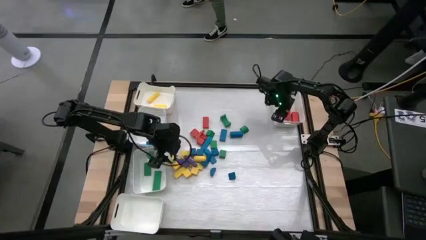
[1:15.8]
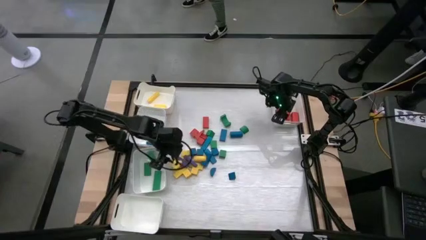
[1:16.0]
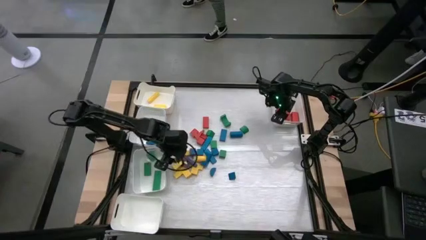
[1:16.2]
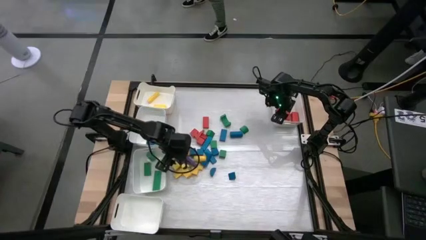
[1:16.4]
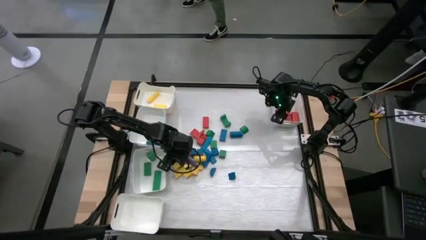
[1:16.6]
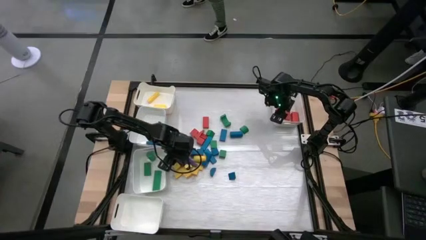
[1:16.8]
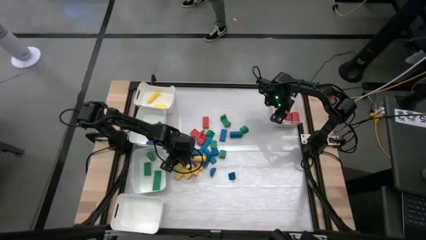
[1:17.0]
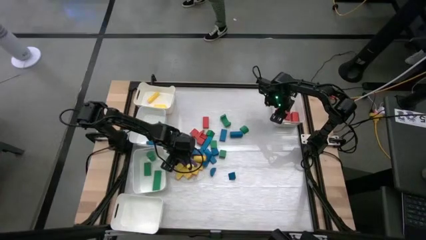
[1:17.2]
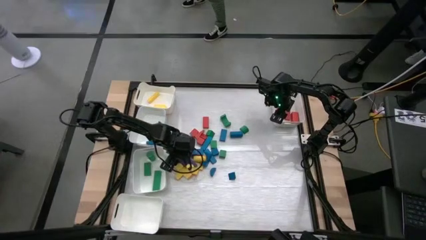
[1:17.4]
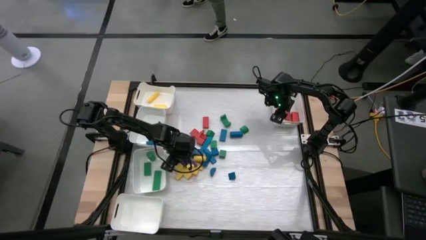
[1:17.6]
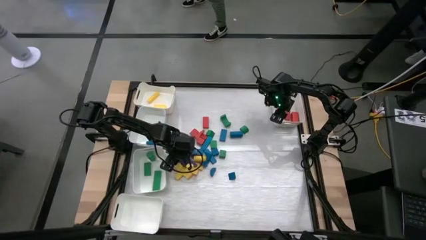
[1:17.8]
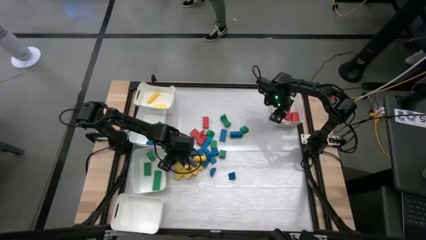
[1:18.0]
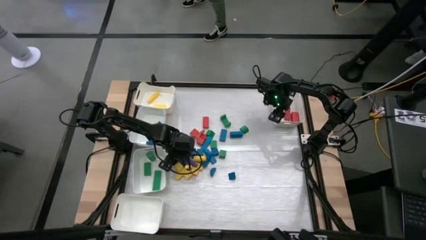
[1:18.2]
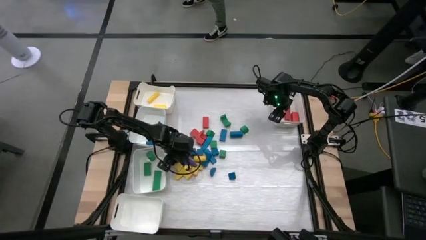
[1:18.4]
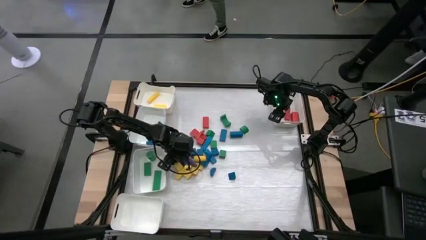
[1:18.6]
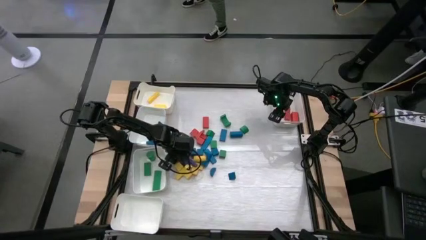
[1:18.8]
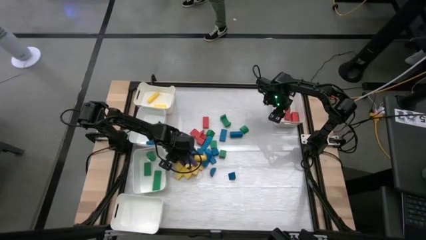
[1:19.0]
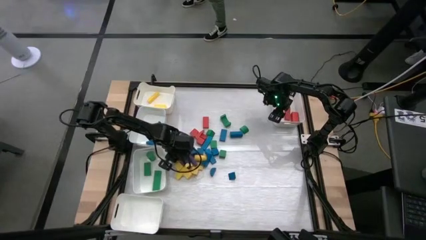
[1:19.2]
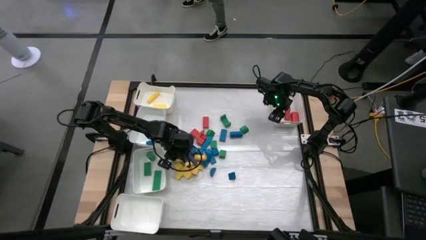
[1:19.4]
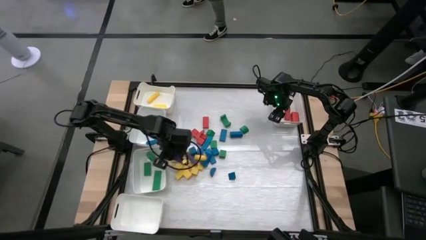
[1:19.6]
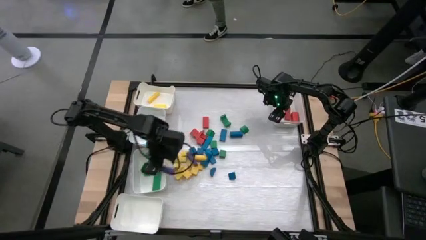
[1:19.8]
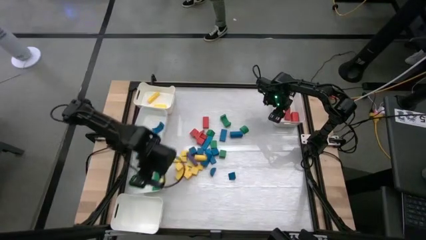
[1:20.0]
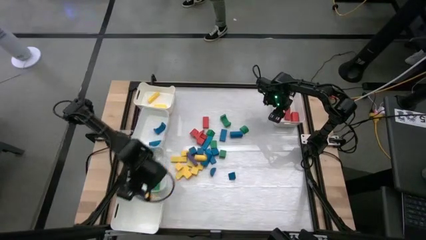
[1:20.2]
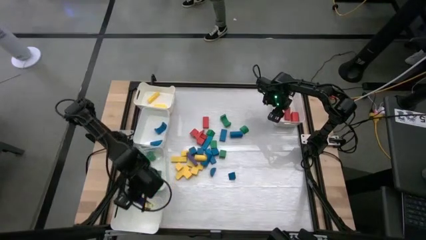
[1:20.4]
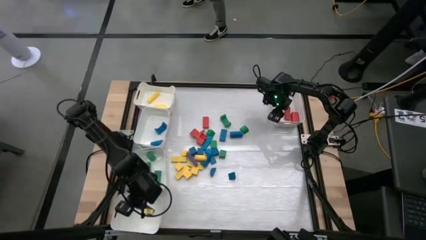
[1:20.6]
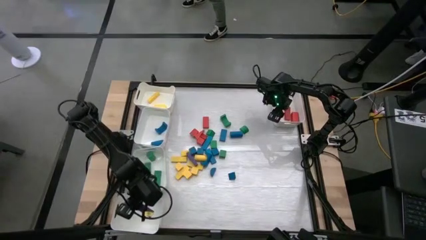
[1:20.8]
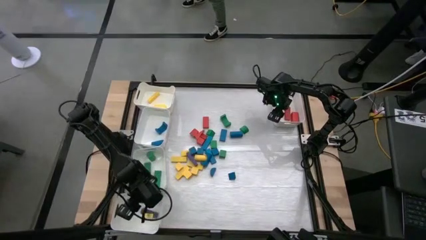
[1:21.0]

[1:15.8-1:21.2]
Task: Sort blocks
Put the purple wooden block into the bottom left white bin

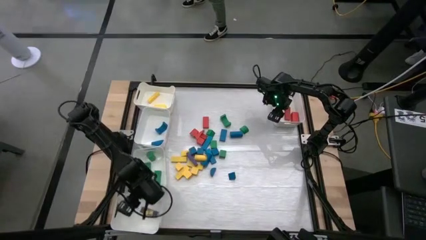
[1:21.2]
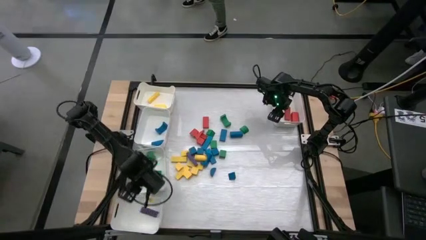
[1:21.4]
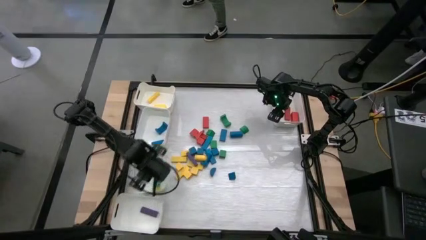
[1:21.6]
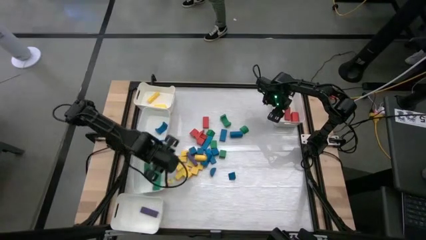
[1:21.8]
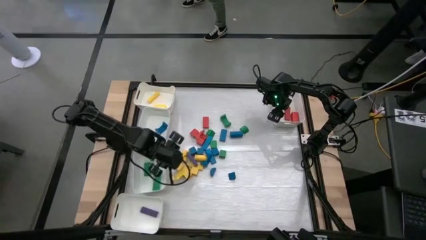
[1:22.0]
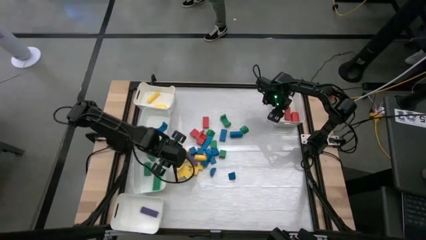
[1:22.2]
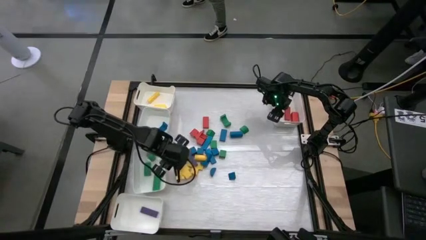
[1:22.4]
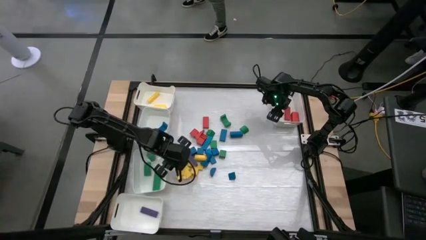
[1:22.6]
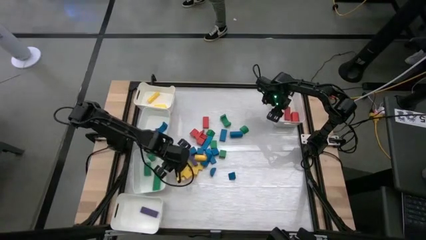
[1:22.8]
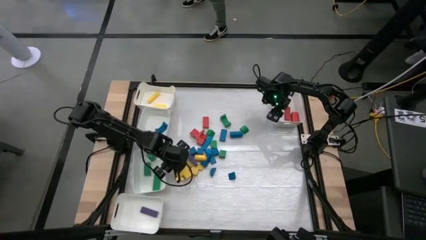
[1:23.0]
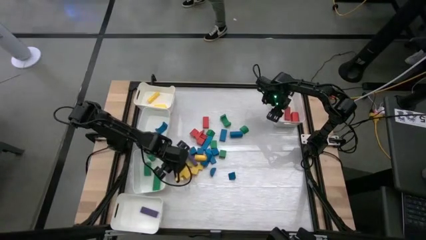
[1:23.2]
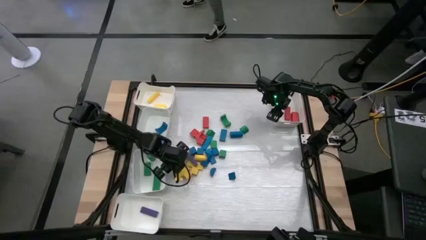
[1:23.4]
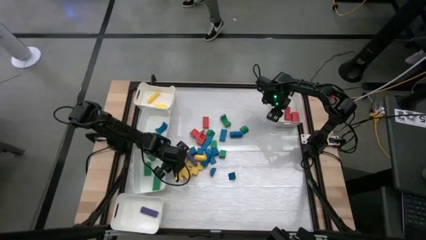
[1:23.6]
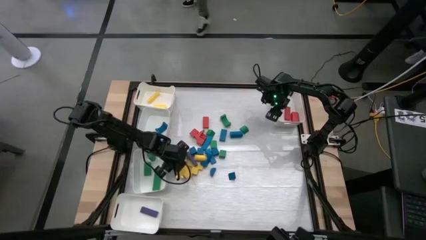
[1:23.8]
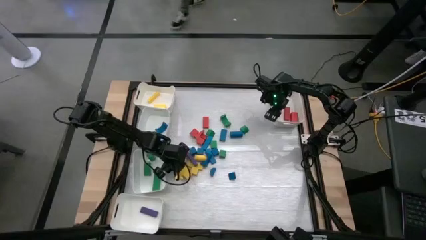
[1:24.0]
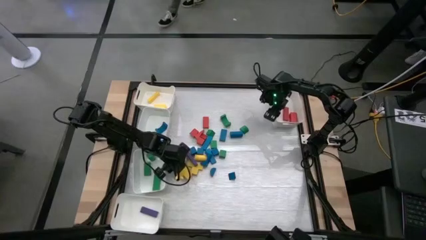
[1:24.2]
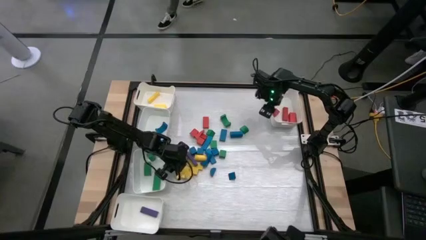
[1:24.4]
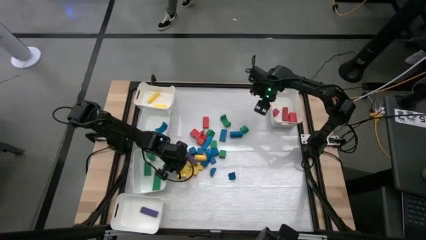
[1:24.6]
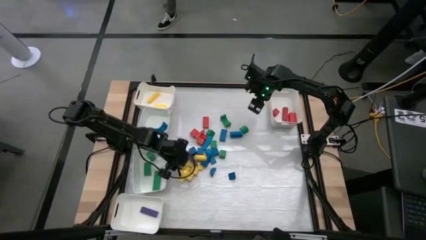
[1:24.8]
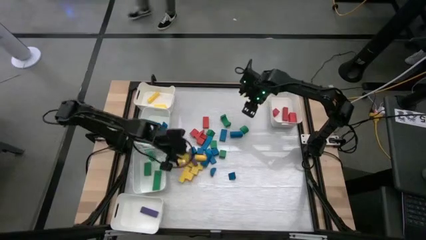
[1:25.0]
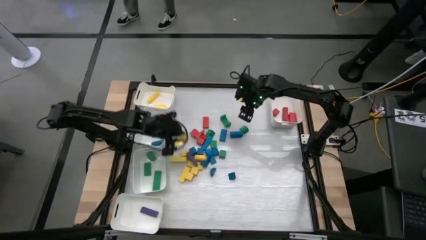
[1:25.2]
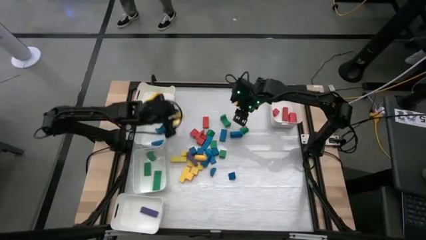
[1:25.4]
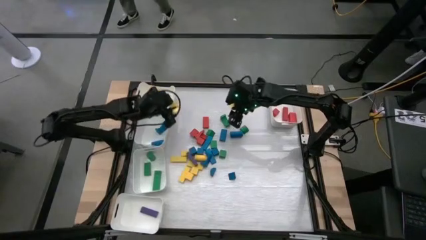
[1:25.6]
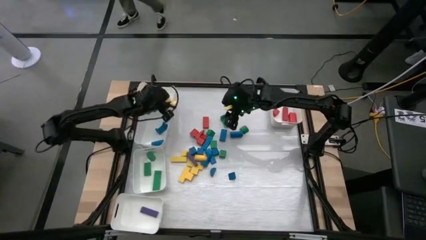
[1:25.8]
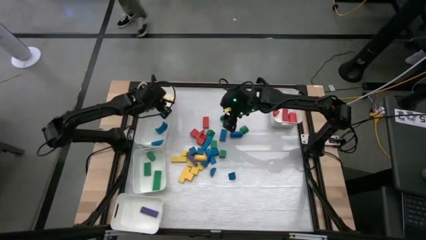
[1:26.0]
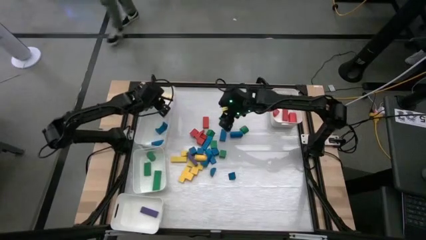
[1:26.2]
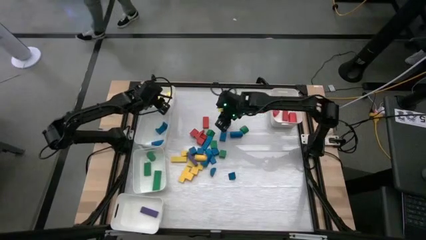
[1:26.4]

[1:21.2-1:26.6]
Put the yellow wooden block into the top left white bin

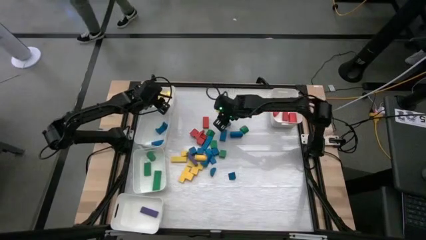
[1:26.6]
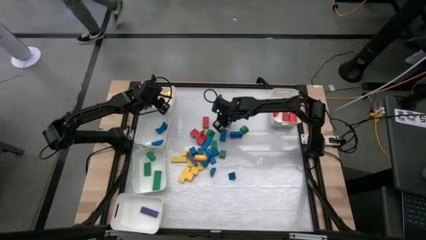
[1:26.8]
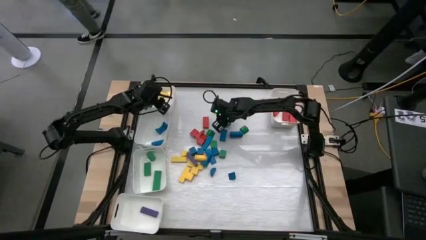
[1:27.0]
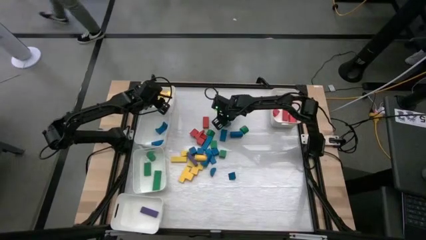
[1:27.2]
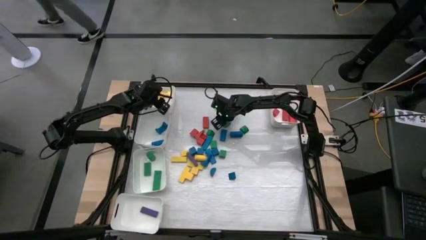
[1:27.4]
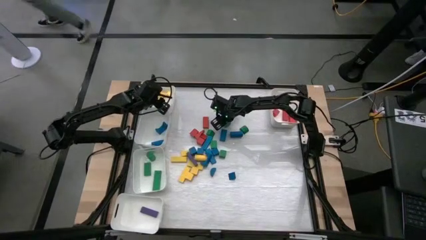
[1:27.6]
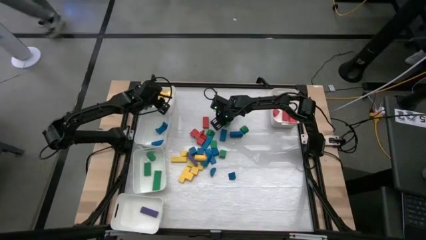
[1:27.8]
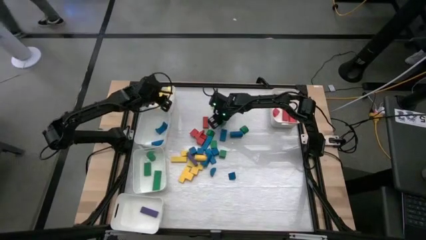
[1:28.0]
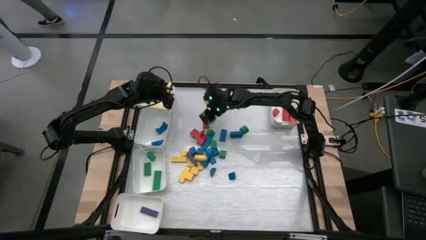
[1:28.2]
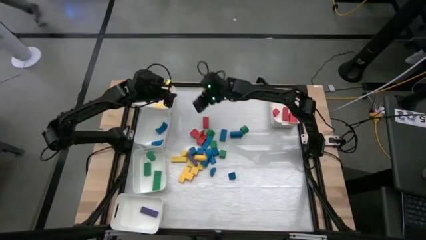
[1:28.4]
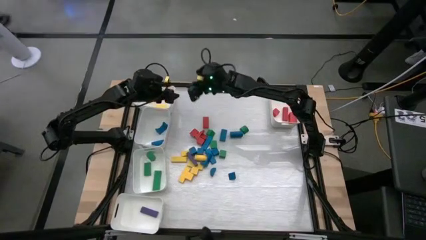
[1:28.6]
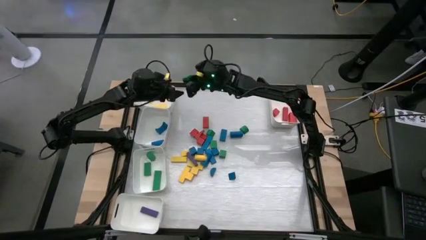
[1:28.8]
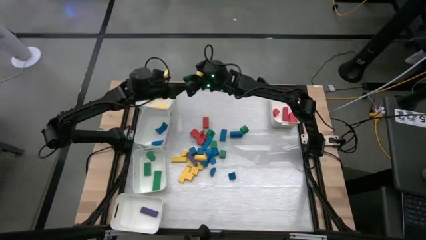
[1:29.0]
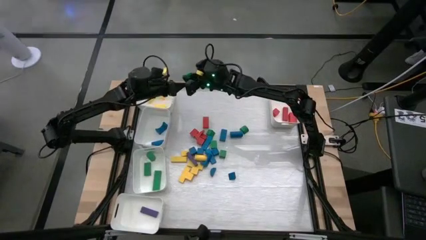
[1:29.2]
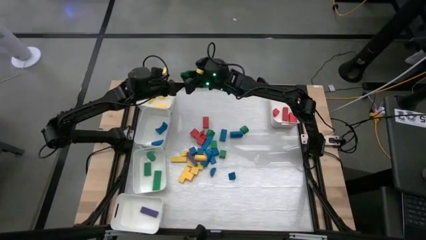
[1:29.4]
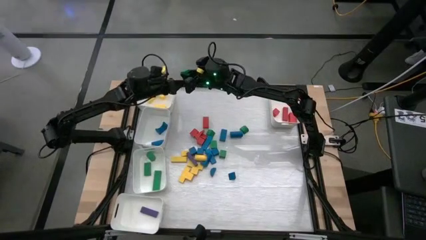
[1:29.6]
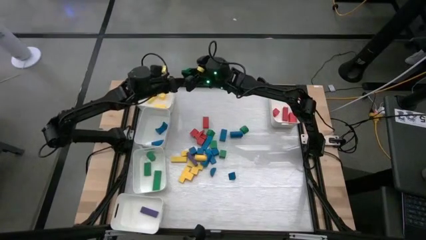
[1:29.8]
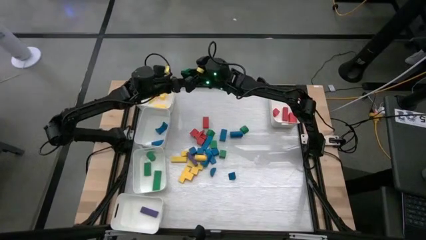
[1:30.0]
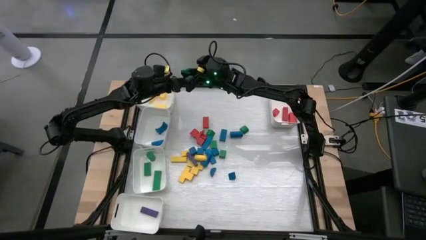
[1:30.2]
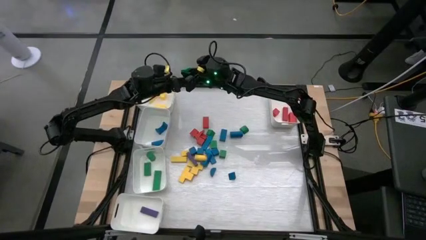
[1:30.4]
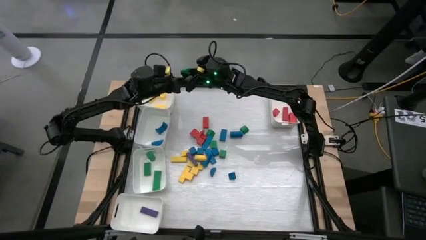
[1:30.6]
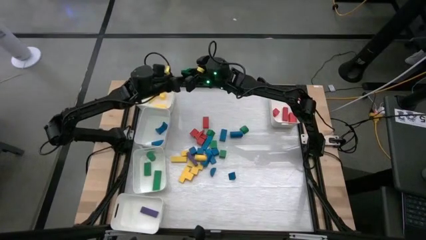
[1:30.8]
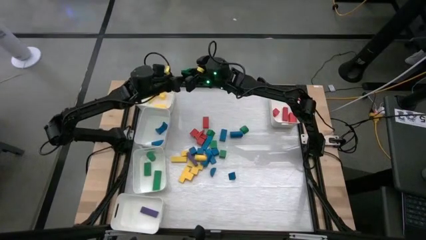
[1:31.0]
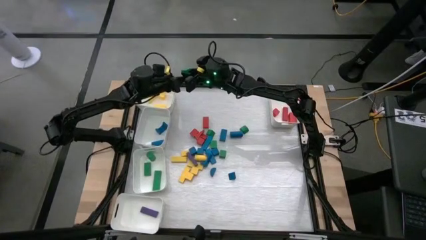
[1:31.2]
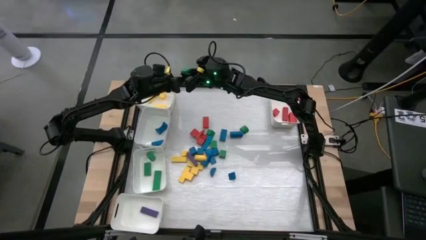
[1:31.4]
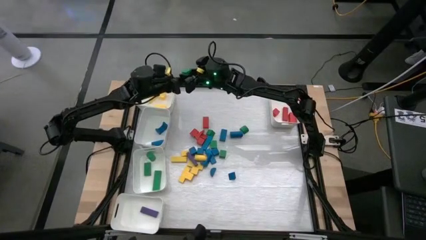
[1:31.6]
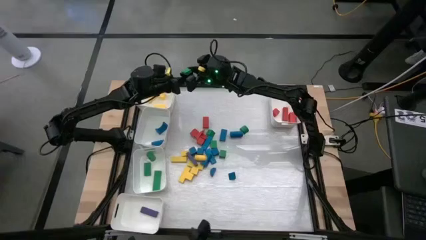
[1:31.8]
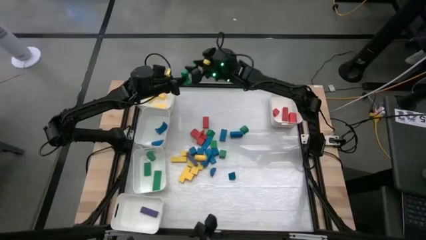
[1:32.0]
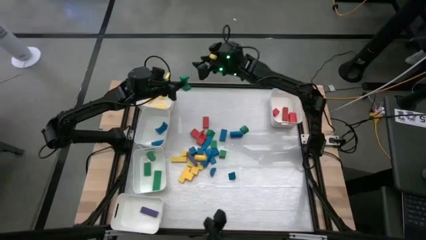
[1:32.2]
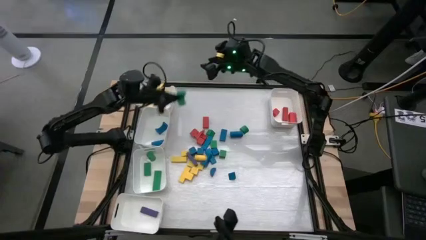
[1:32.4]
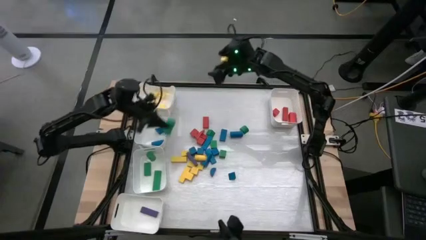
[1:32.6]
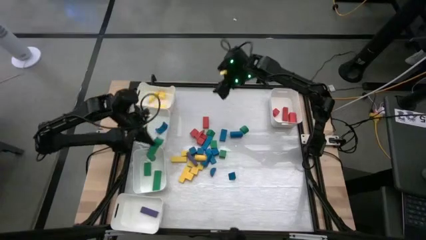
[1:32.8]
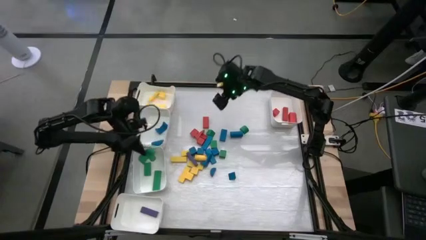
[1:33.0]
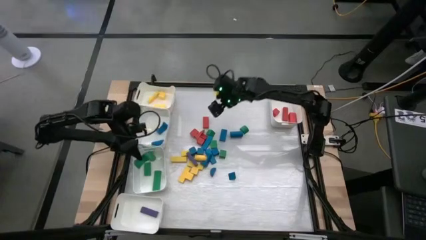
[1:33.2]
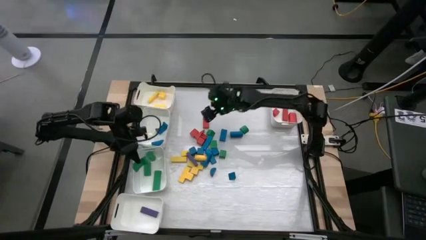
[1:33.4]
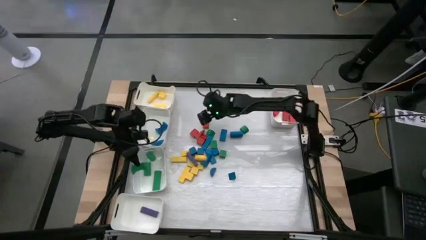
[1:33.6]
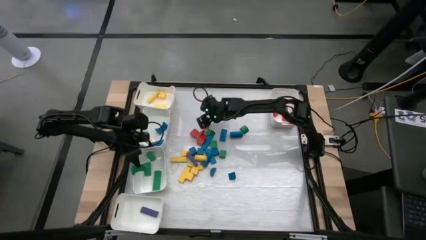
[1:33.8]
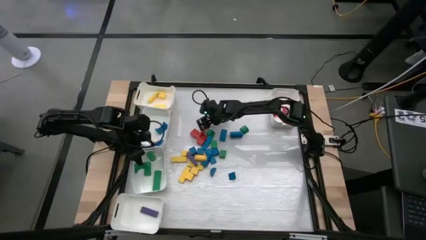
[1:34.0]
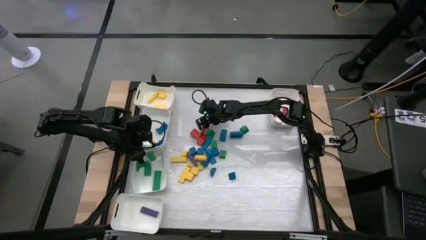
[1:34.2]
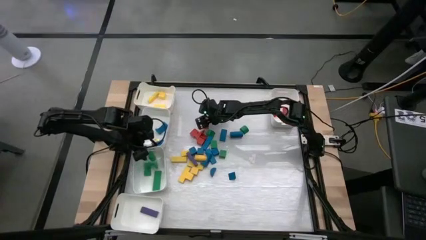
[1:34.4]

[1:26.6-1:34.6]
Put the green wooden block into the bottom middle left white bin
